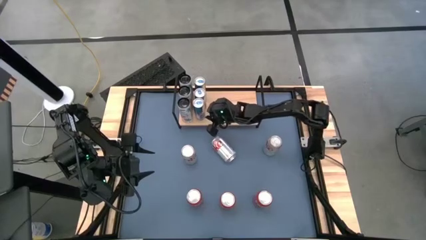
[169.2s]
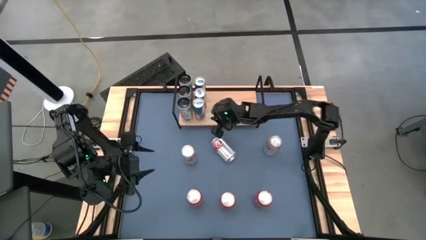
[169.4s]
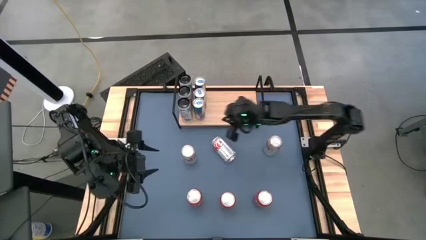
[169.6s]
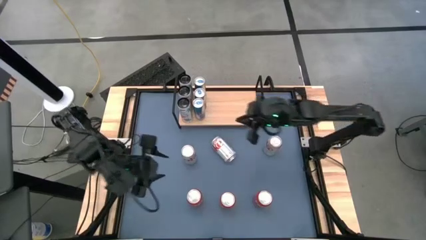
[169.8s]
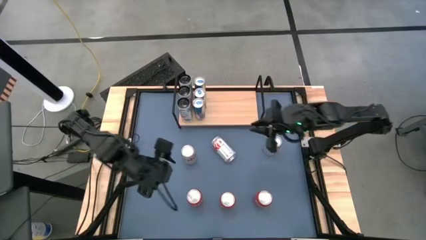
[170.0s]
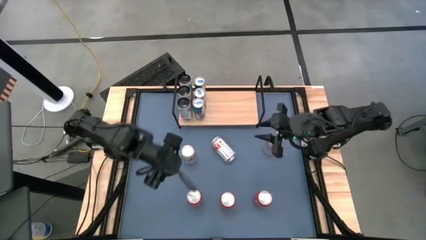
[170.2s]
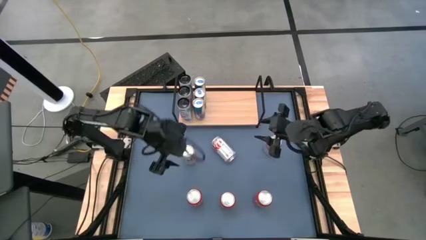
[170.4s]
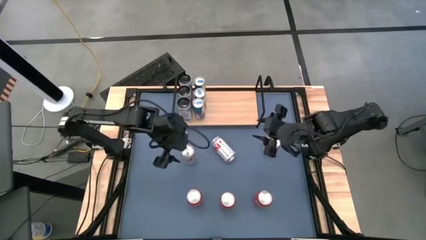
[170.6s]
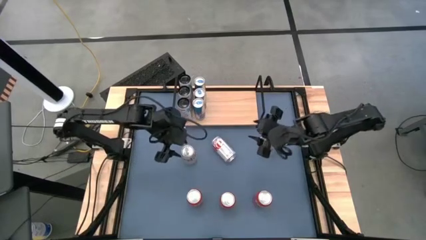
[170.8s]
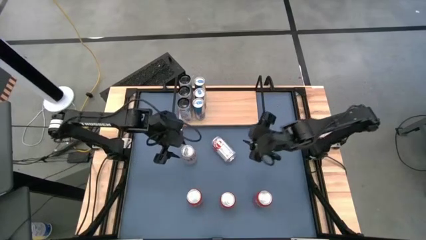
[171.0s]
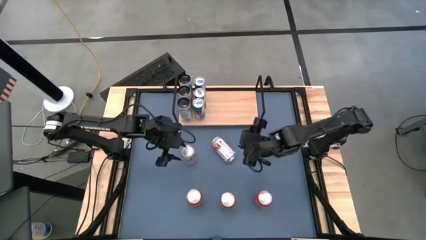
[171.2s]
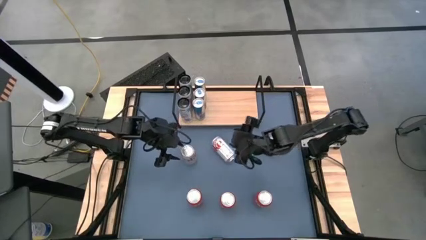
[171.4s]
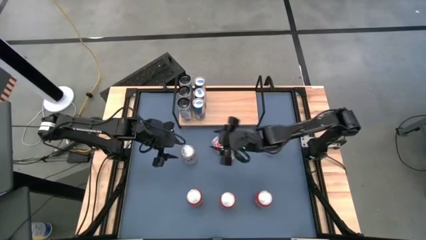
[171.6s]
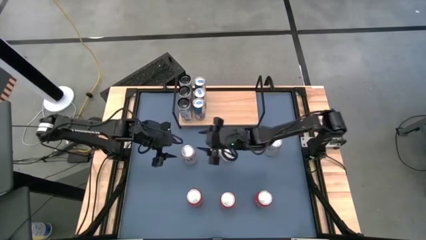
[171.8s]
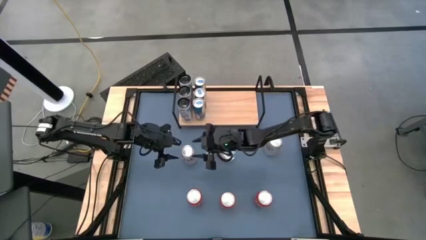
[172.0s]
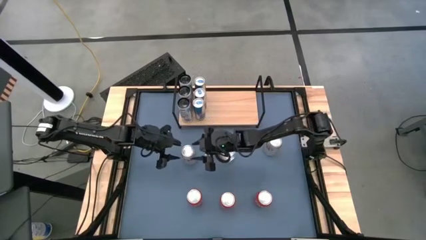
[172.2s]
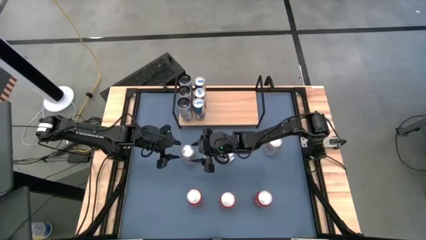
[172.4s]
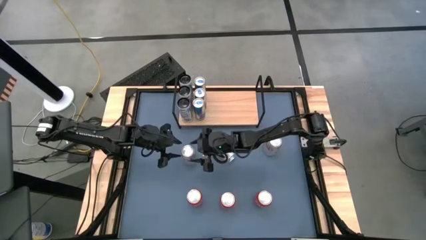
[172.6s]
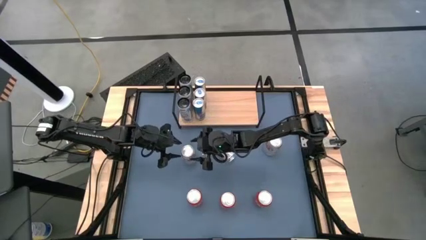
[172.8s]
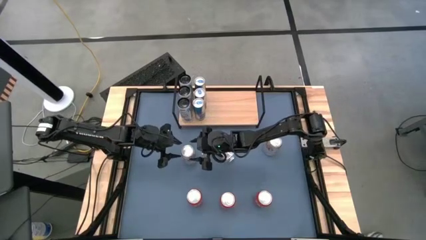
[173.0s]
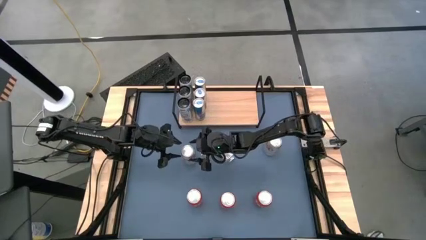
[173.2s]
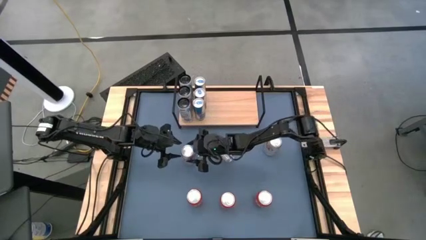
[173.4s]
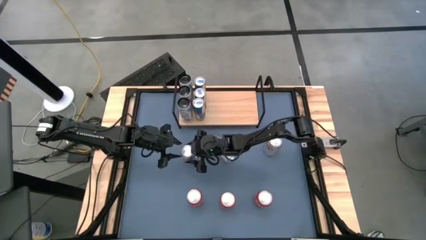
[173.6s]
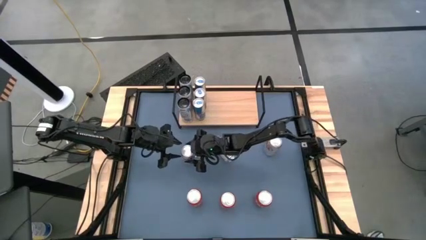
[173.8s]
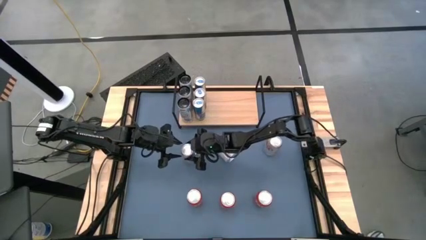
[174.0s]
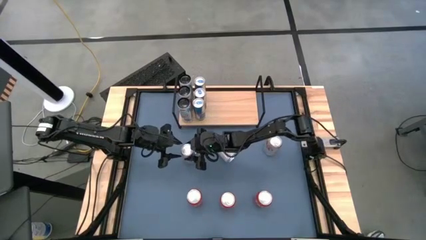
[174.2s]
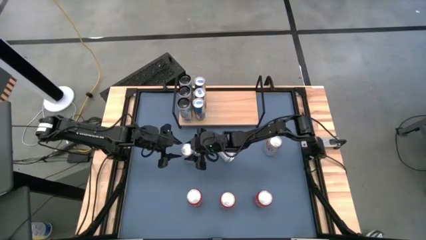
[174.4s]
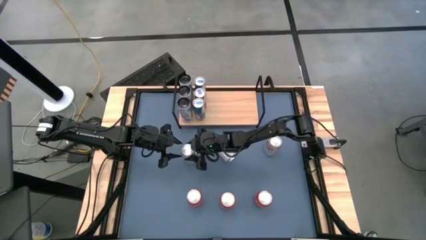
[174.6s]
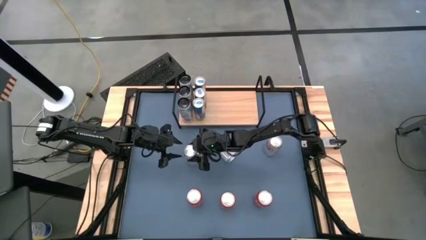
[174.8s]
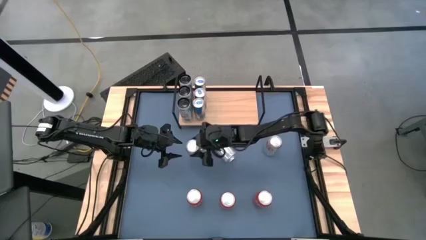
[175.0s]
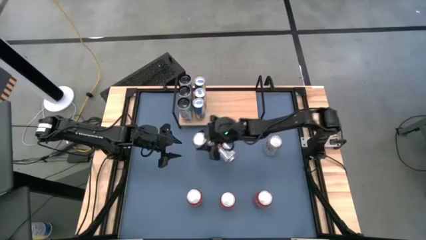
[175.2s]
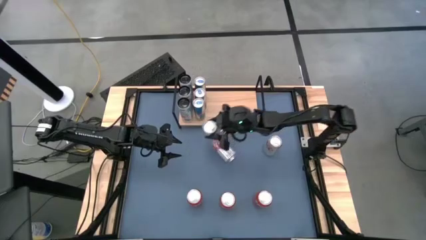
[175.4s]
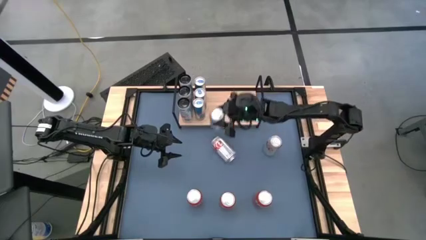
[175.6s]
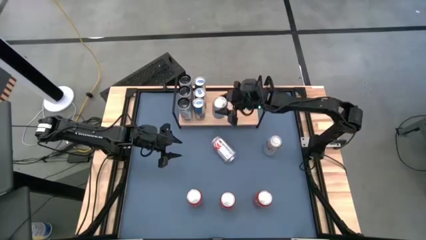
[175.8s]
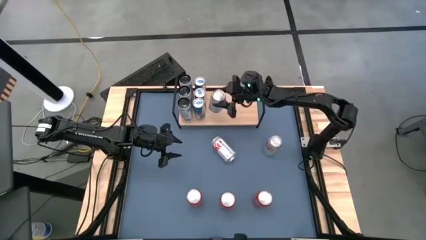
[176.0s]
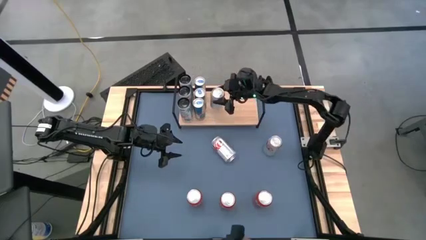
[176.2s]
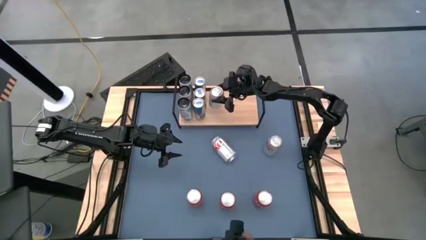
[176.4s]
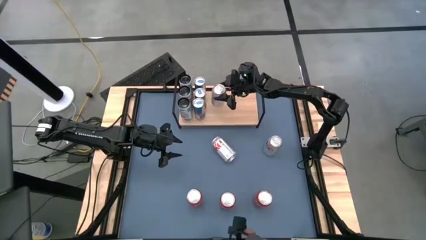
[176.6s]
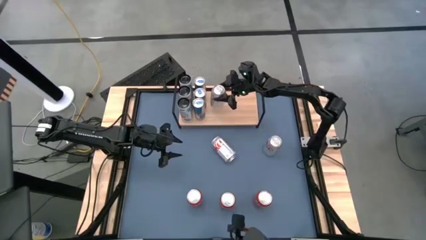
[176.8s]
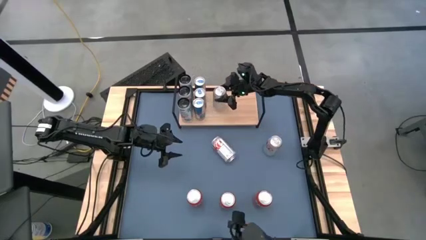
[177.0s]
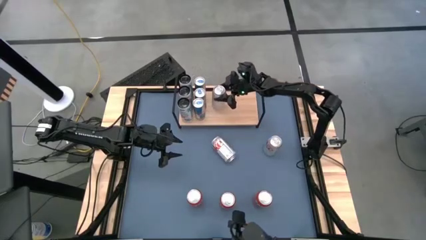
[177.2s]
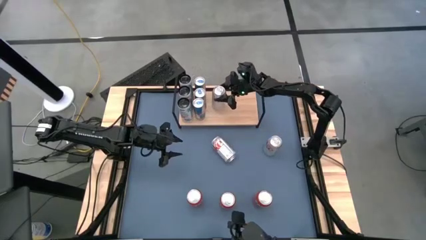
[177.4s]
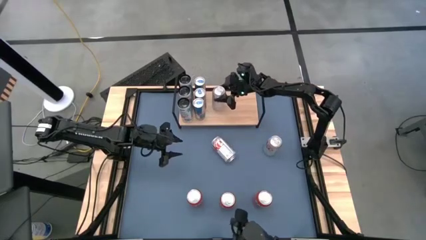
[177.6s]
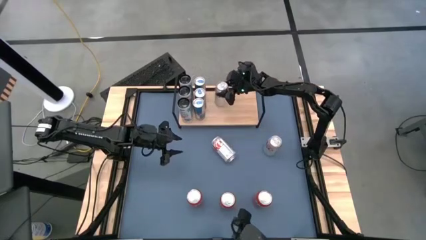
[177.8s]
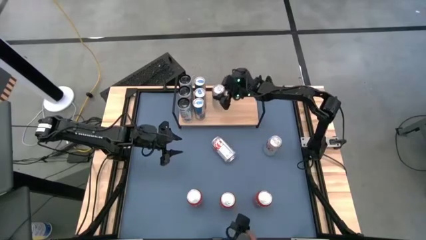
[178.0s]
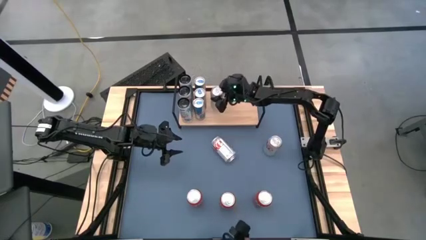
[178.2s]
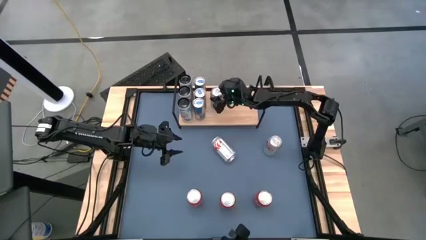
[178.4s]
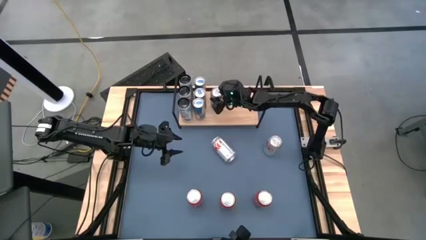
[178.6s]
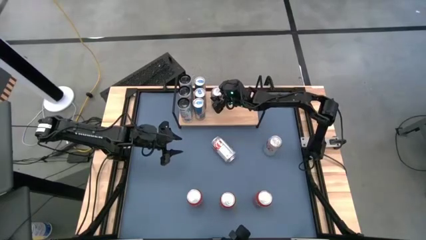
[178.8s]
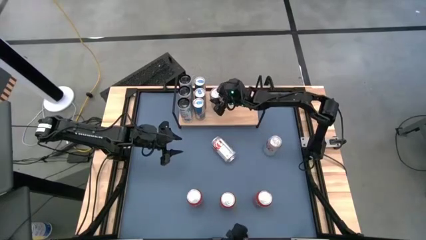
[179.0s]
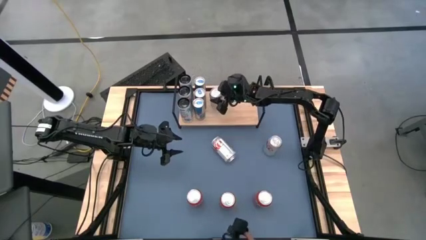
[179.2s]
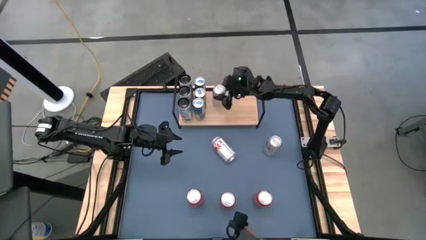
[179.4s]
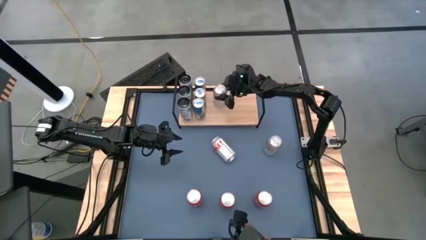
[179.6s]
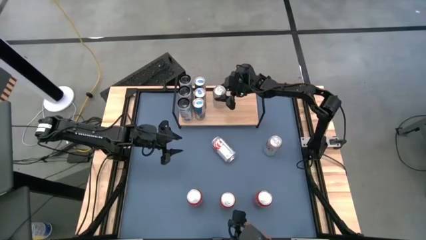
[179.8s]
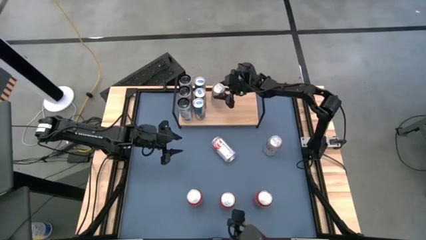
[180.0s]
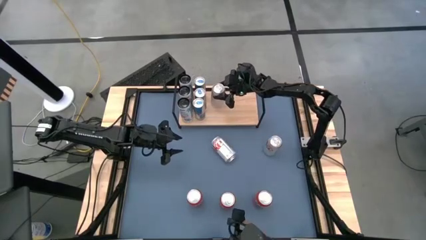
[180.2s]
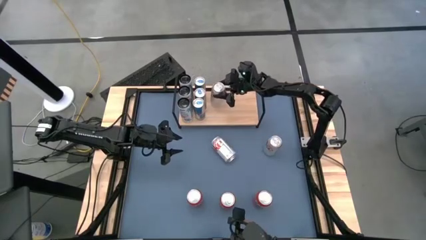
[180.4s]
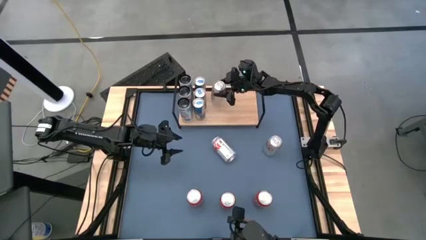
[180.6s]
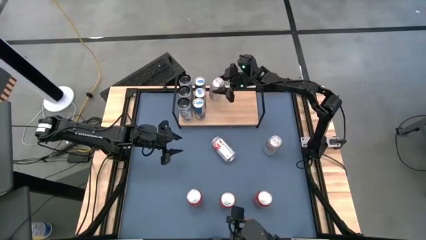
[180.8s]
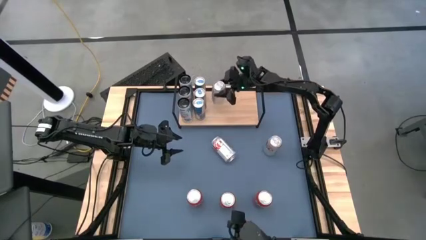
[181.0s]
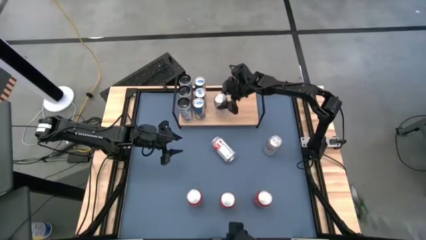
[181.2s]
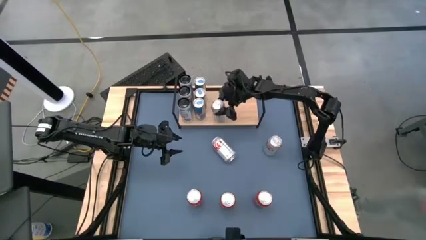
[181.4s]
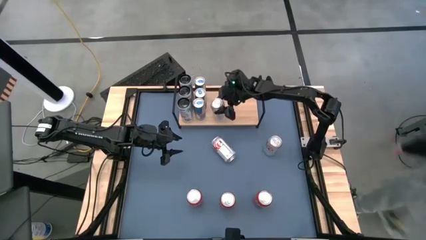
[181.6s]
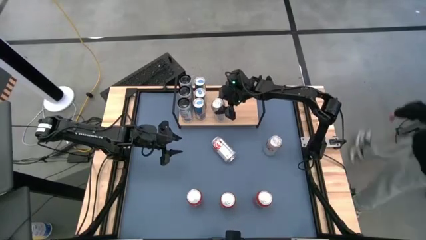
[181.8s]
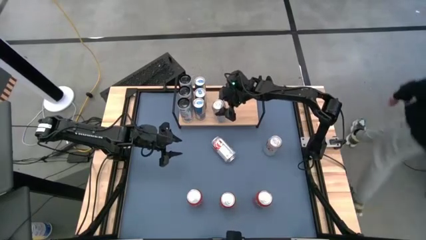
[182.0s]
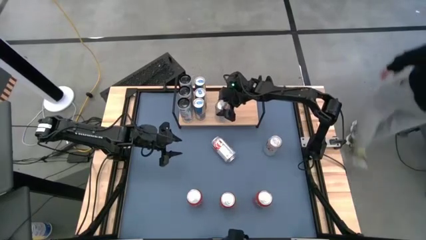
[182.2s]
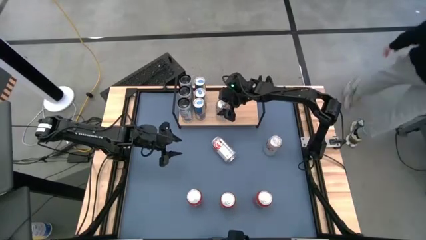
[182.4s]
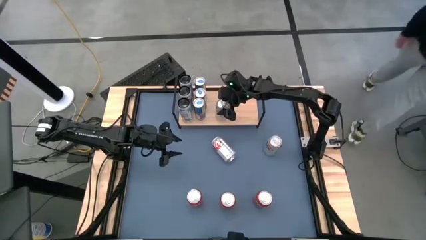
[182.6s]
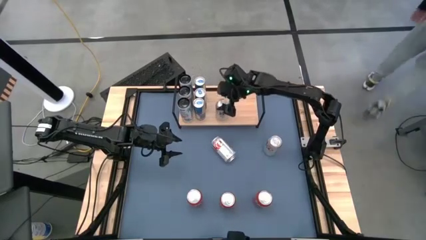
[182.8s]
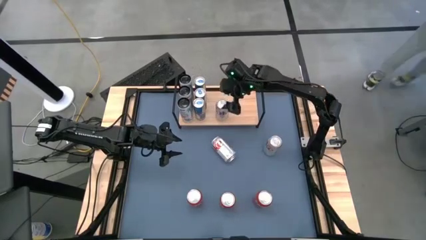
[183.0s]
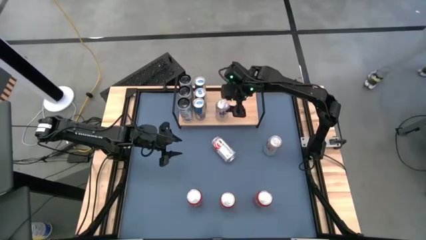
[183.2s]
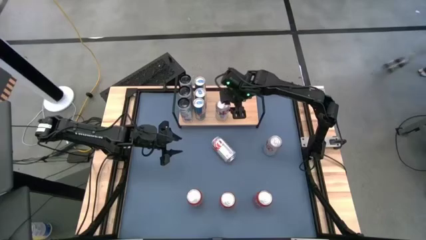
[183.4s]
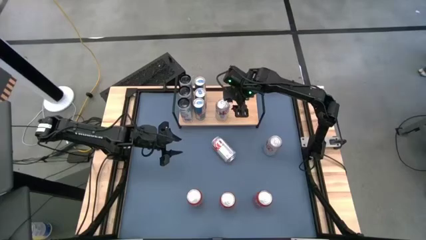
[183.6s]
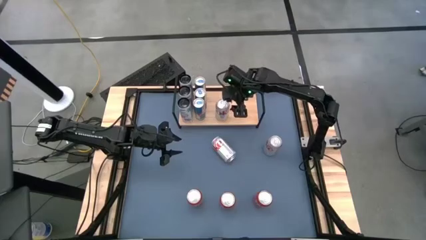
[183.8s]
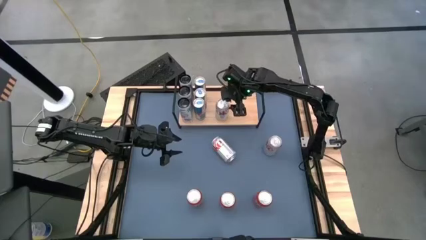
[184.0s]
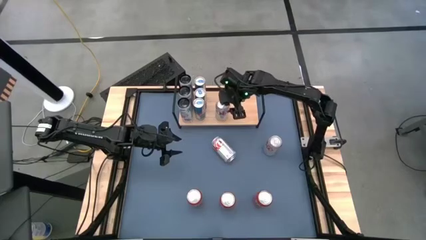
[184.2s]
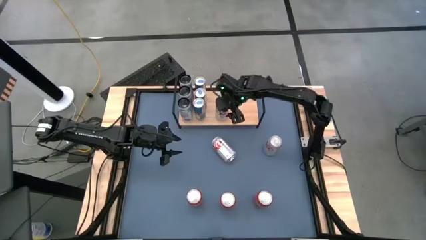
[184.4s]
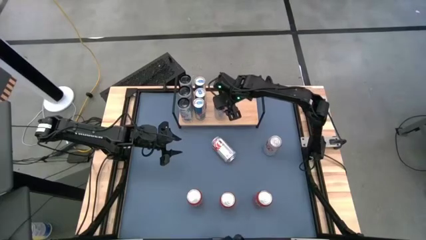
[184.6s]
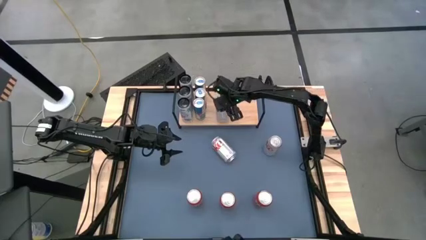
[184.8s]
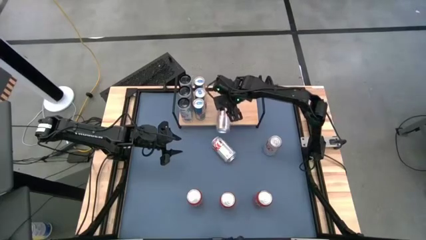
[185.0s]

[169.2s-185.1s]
Task: Place canned beverage on shelf
Put the left silver soda can on the shelf

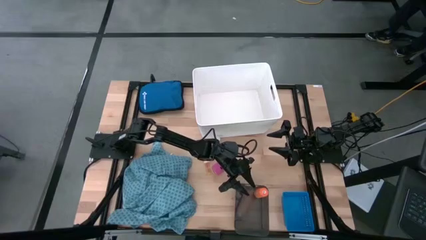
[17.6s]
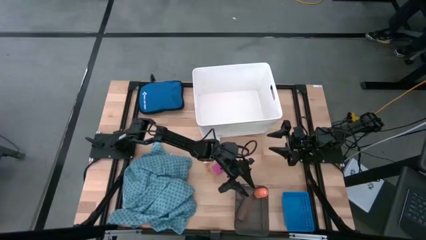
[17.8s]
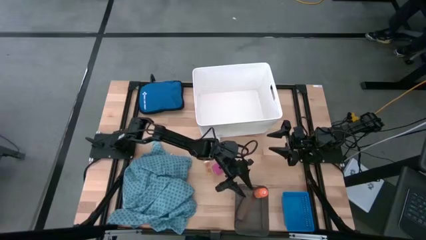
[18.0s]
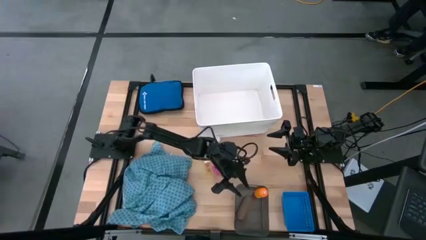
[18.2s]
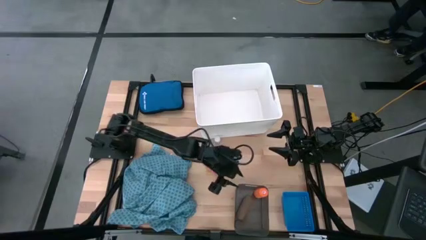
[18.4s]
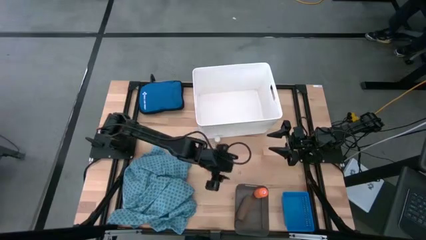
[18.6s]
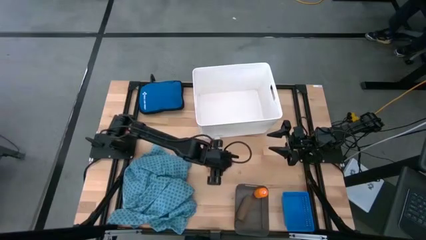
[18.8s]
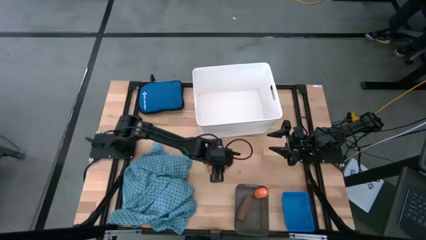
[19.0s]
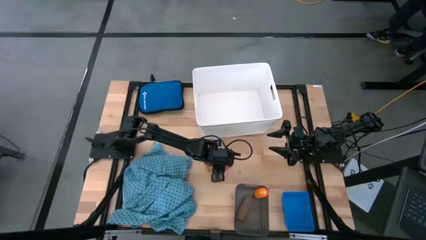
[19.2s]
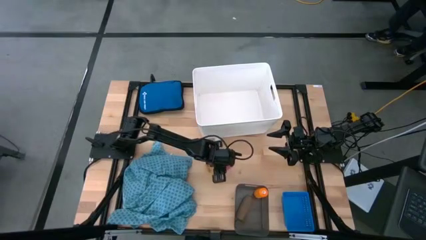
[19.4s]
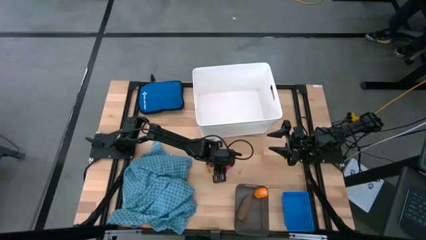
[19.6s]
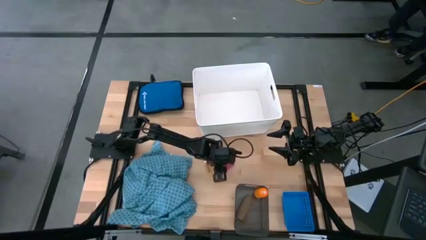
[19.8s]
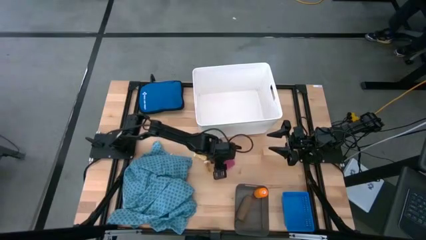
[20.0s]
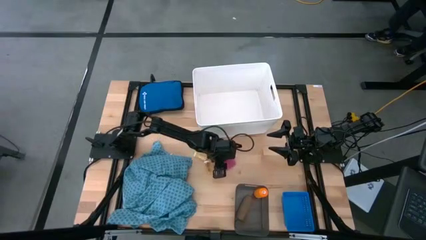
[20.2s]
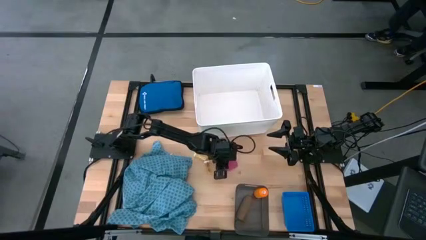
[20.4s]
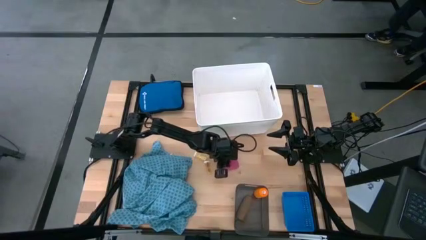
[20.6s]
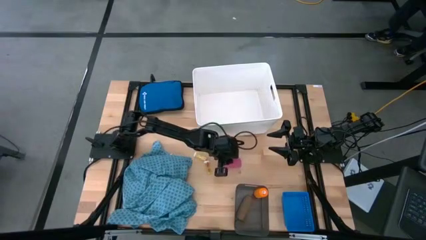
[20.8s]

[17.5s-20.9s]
Task: Pick & place medical supplies in basket/bin
Put the pink bandage into the black bin
